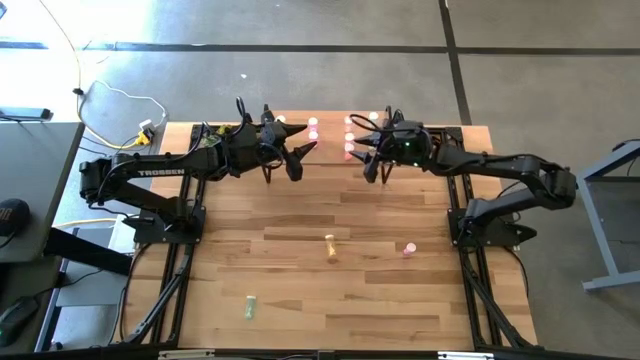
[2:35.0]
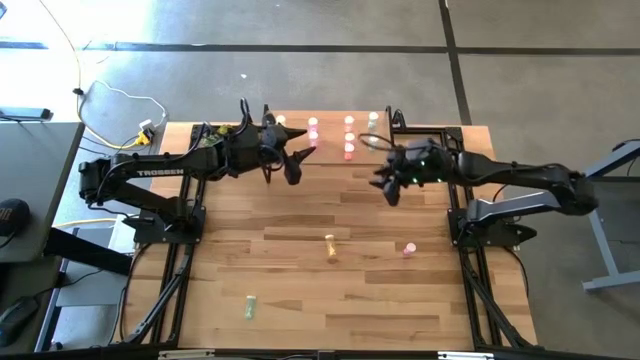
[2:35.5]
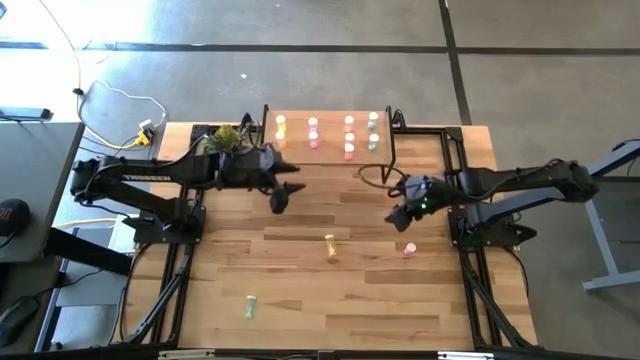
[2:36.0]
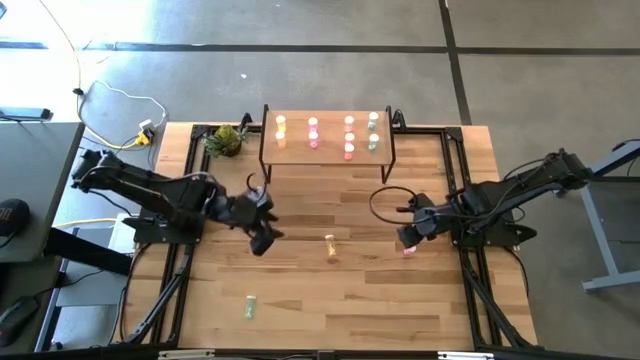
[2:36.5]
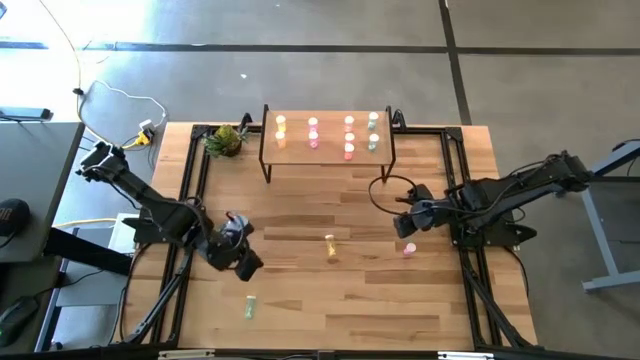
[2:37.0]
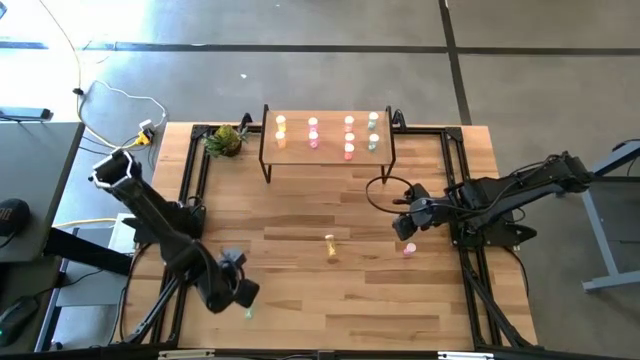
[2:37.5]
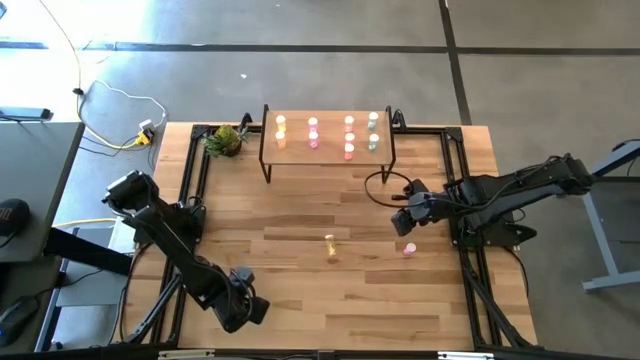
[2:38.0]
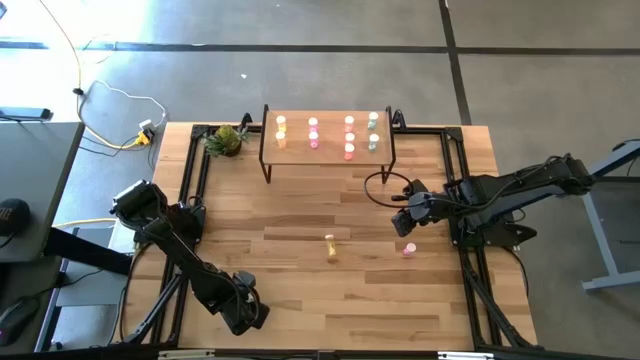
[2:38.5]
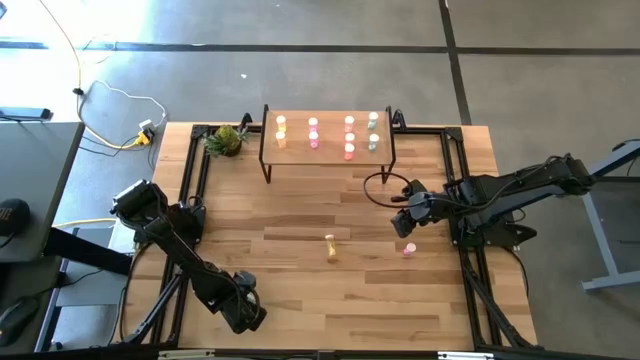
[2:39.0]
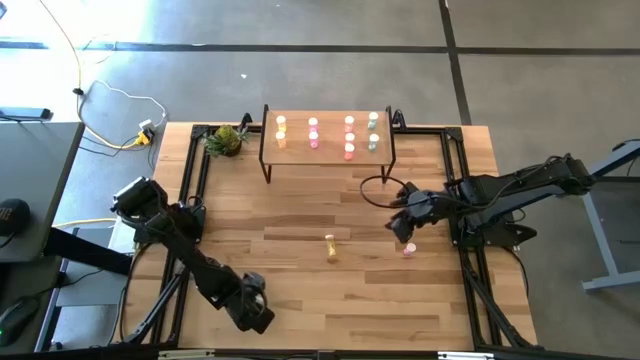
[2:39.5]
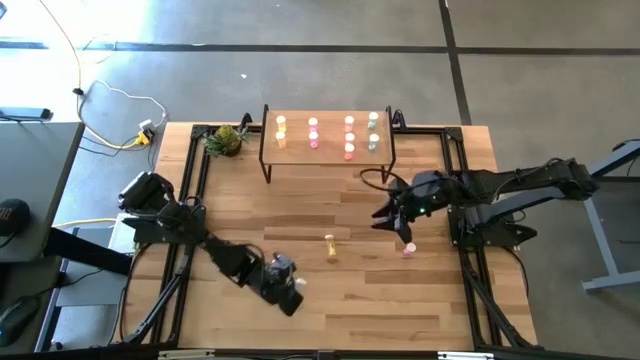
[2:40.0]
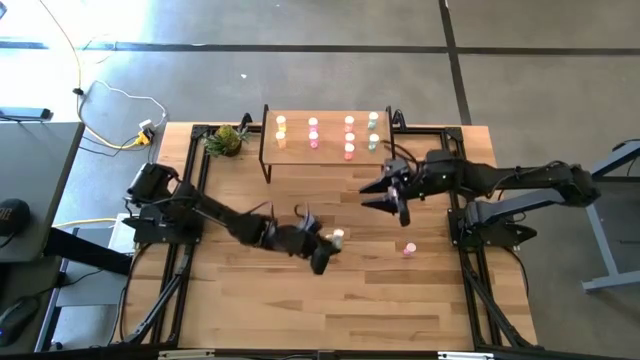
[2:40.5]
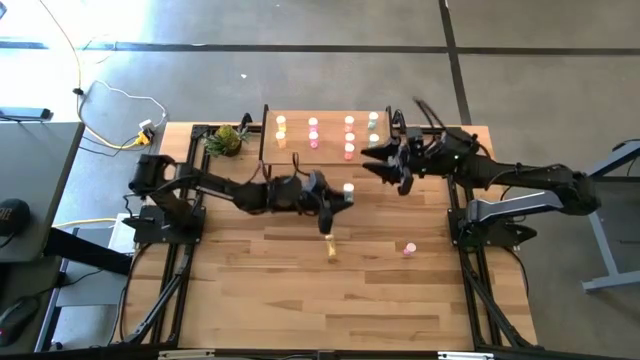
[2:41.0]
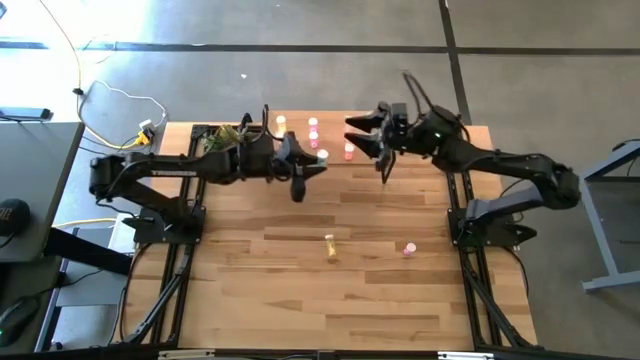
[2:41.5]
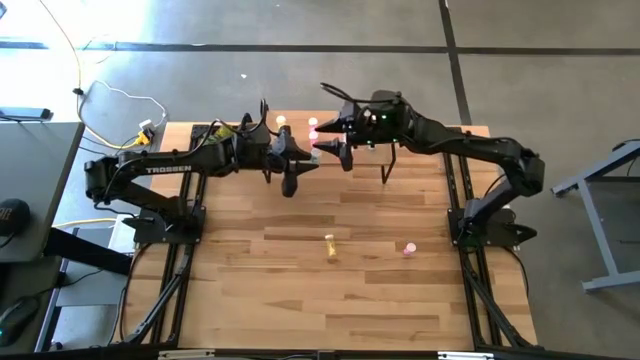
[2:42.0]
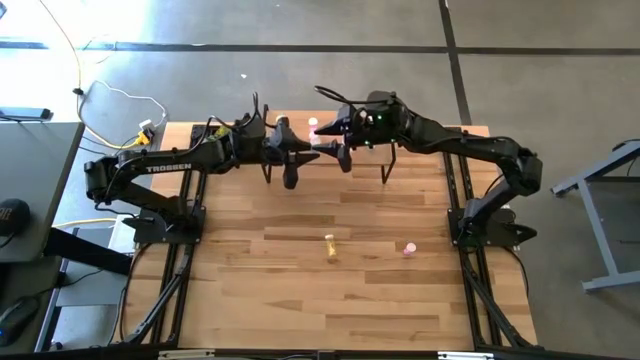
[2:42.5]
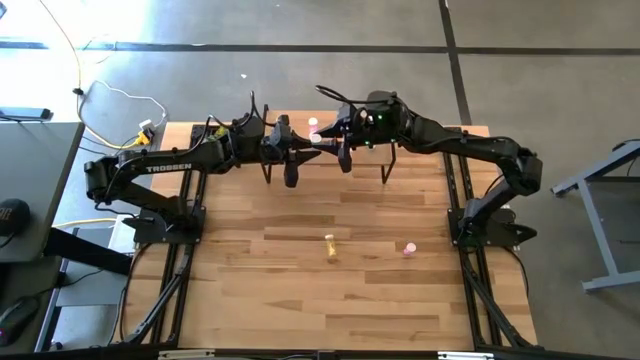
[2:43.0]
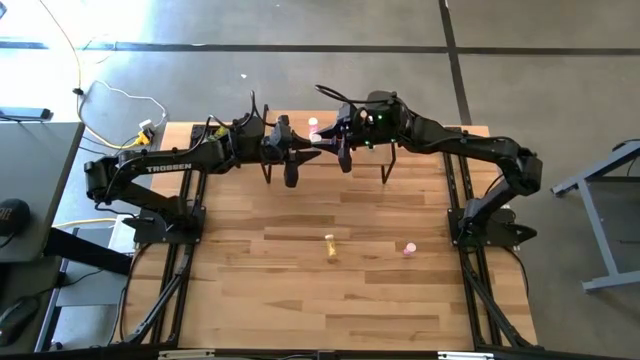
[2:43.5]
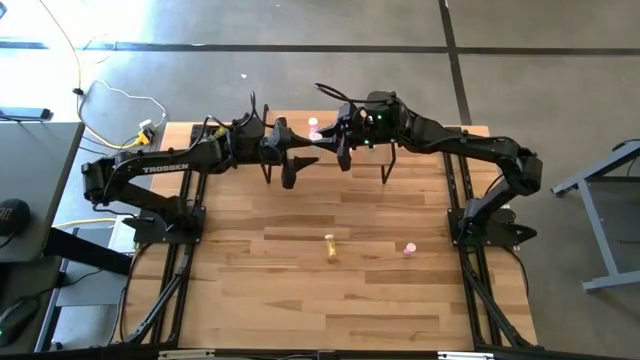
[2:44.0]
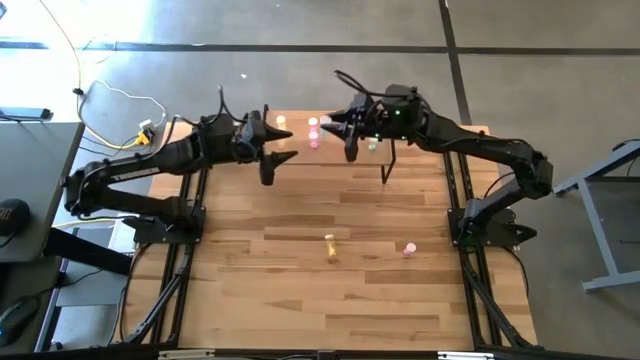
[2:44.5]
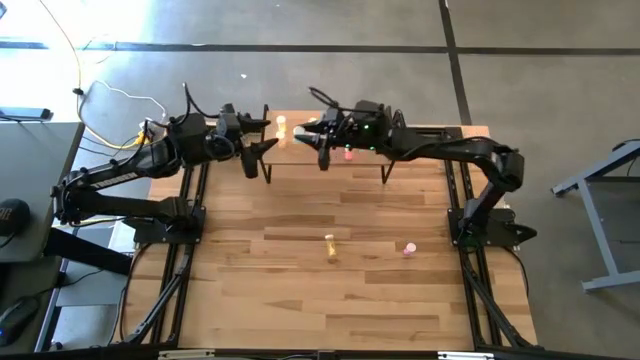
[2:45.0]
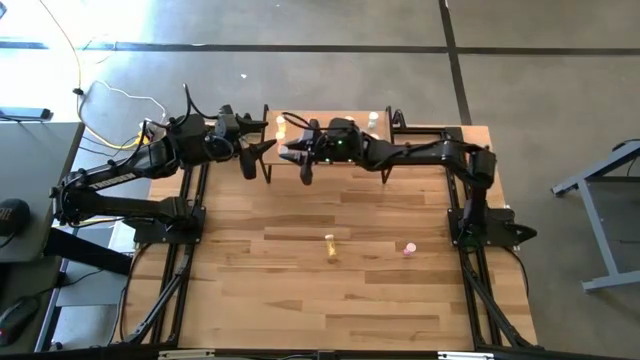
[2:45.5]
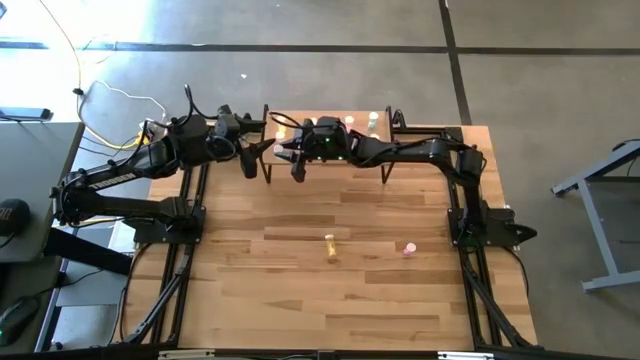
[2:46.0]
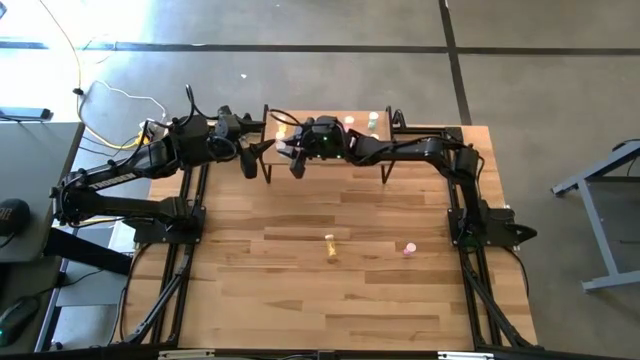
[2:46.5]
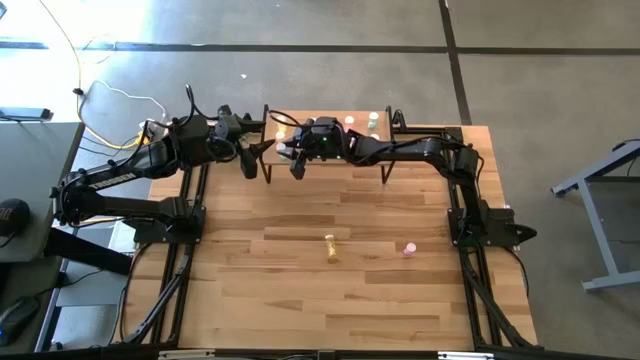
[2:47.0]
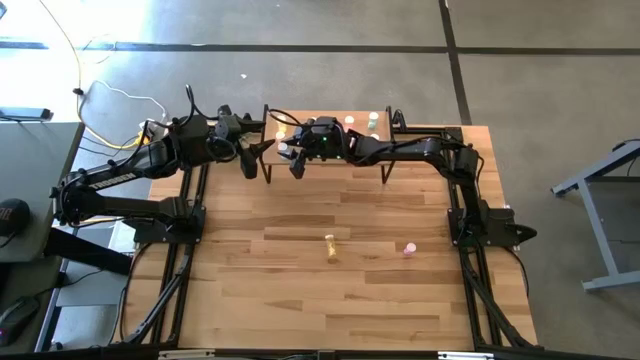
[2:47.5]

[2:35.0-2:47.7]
Task: Pick and place medicine bottles onto shelf by color
Put the blue pill bottle on the shelf

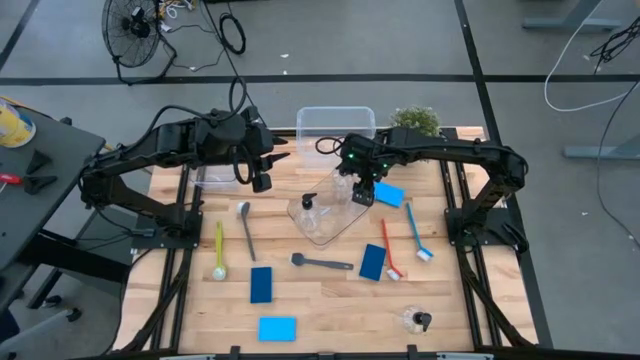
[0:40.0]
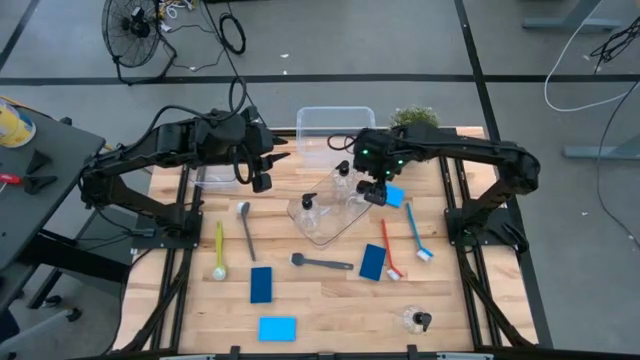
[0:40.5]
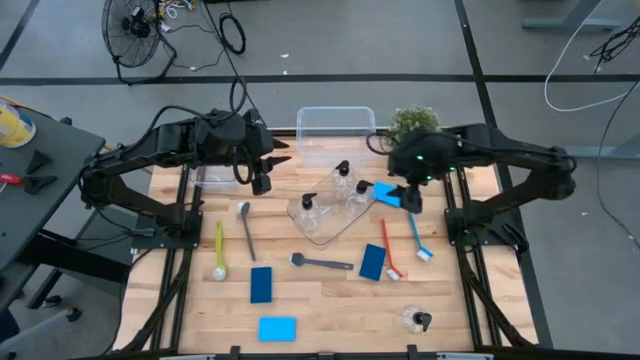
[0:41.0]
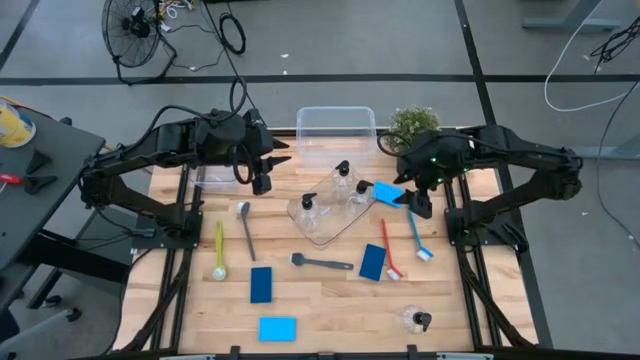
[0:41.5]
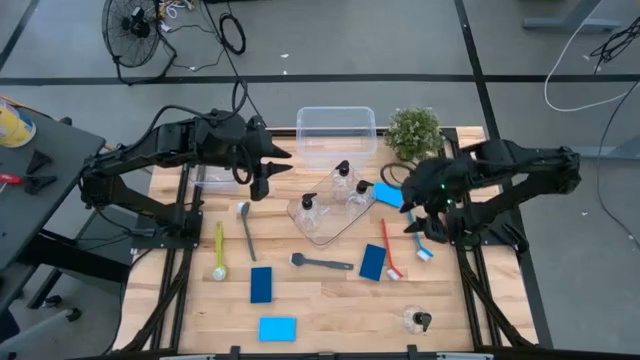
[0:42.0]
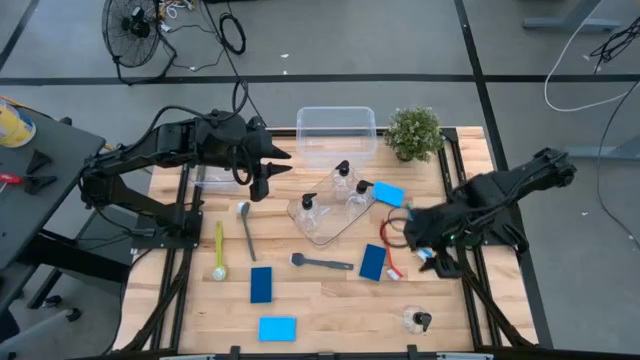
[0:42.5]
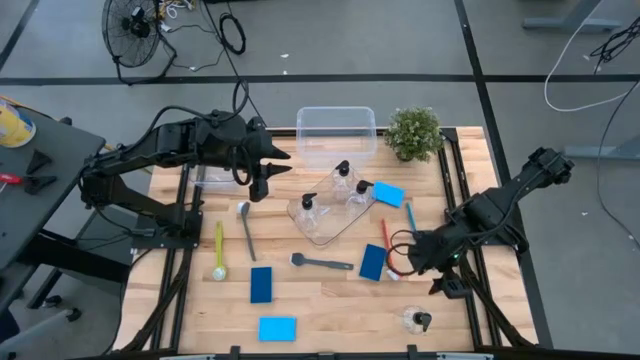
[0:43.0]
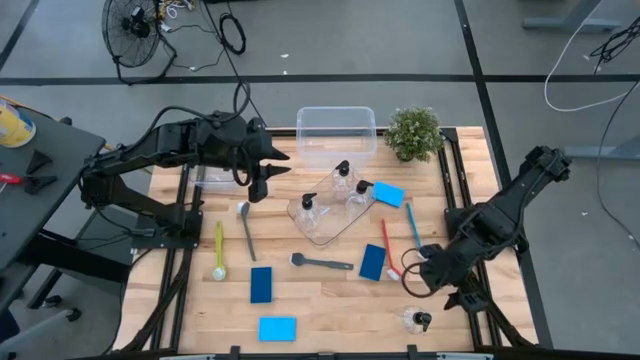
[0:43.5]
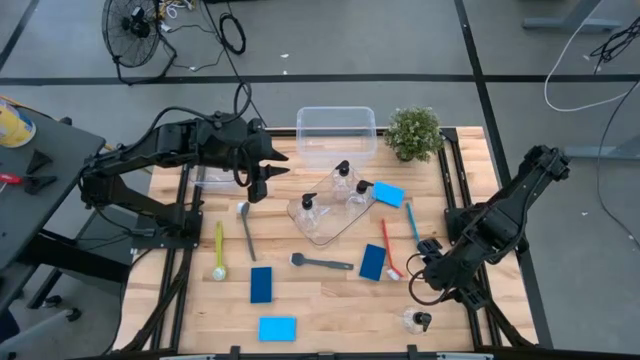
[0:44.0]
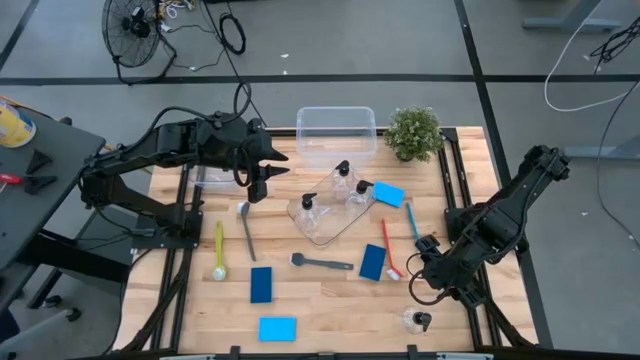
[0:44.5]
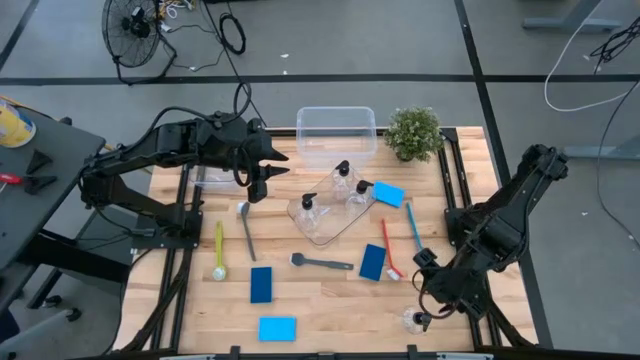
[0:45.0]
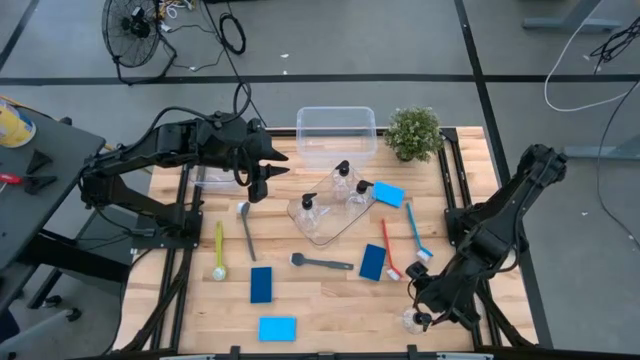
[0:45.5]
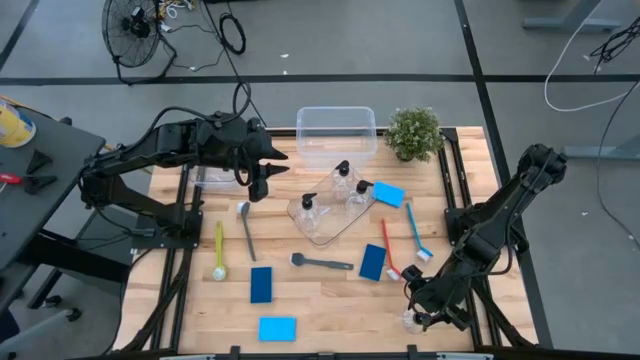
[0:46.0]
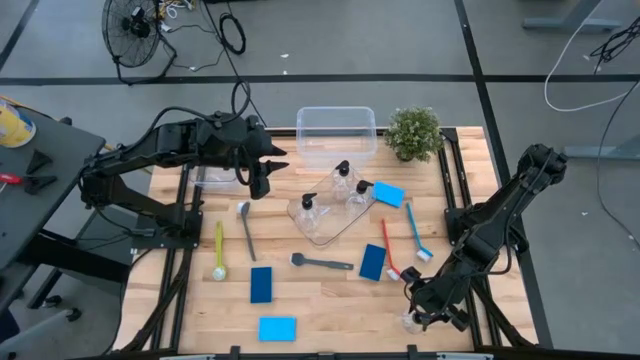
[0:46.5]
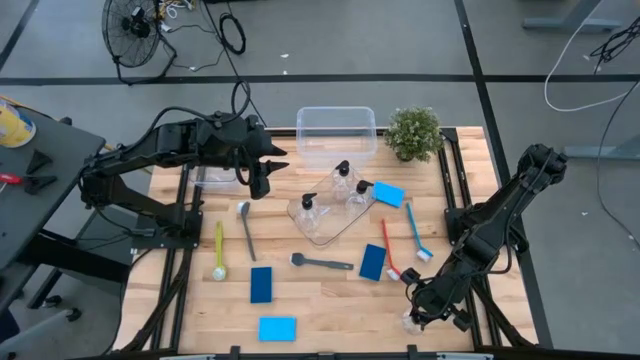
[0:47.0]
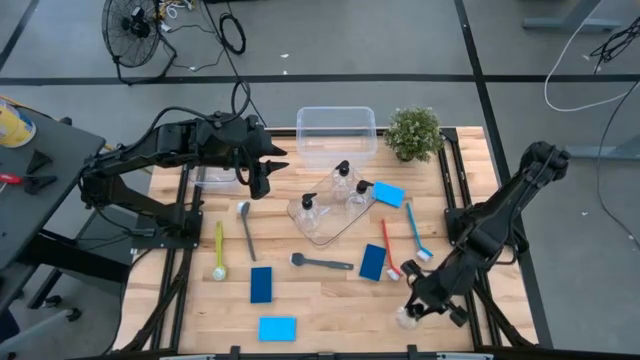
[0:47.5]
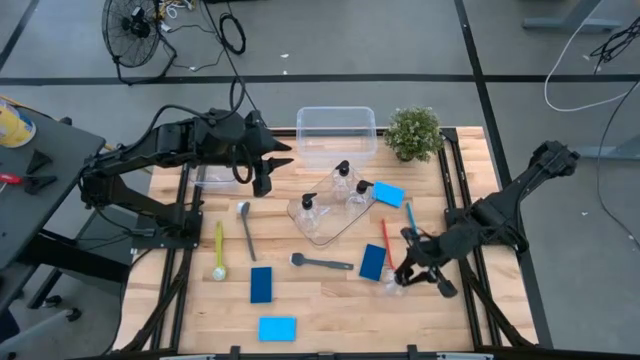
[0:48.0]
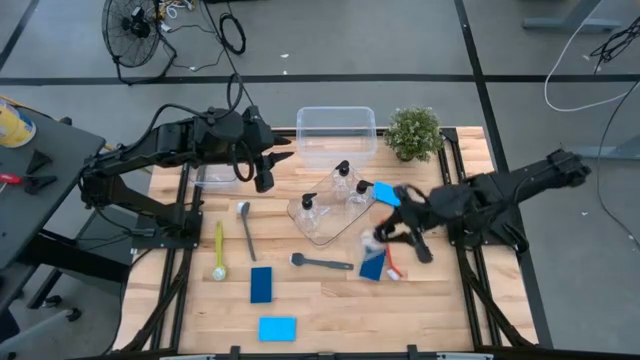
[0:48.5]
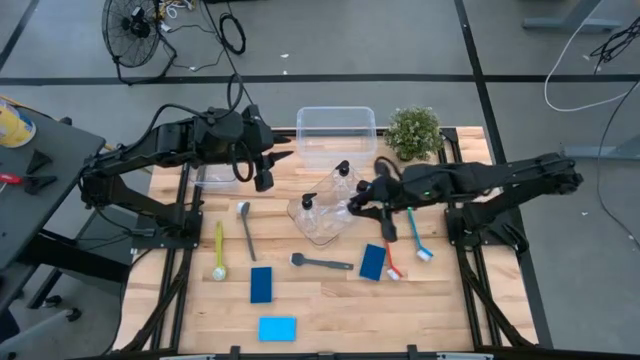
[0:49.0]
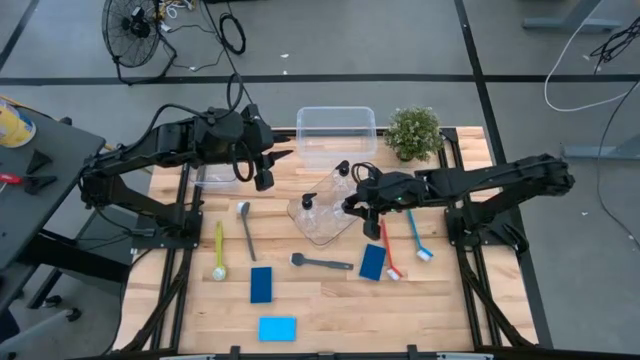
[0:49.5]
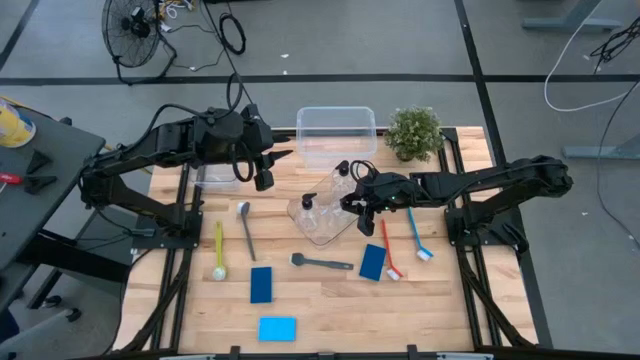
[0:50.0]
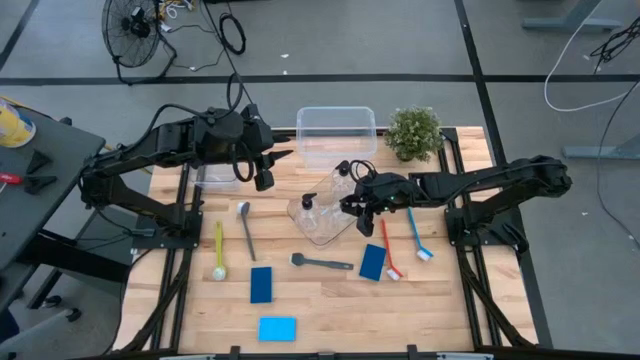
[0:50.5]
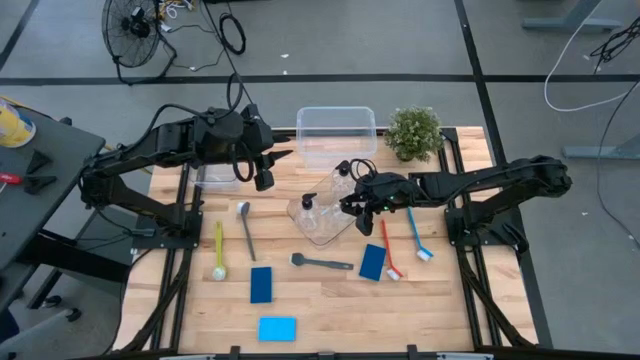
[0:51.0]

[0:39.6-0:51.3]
Task: Pick & Place Kitchen Sink Supplies
Put the dishwashing liquid dispenser into the right transparent bin
